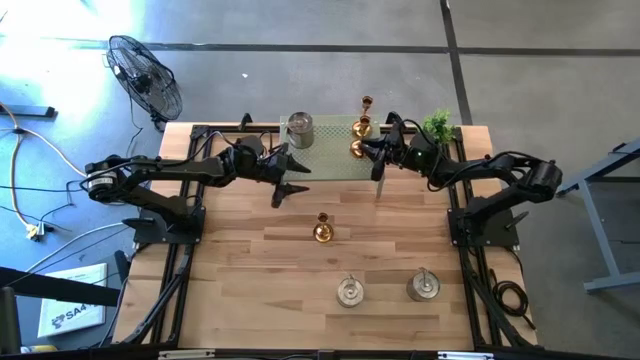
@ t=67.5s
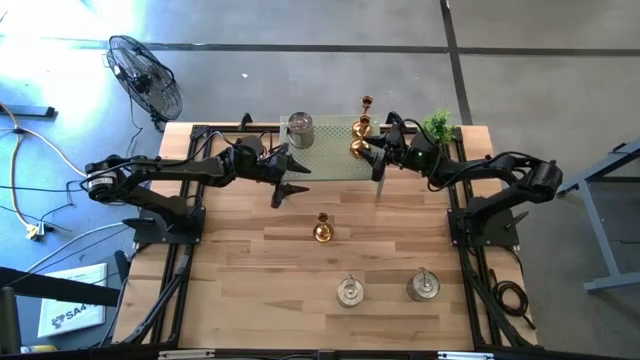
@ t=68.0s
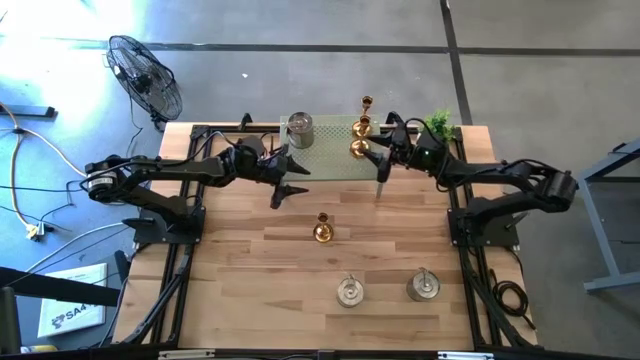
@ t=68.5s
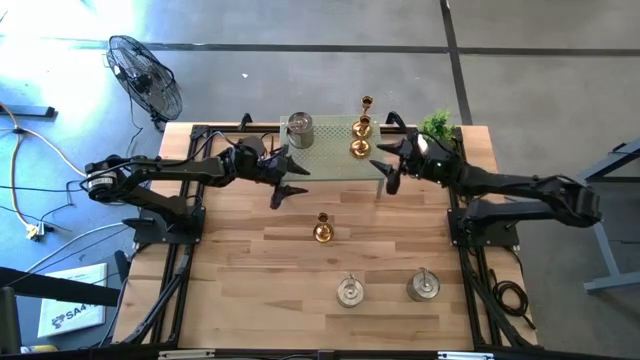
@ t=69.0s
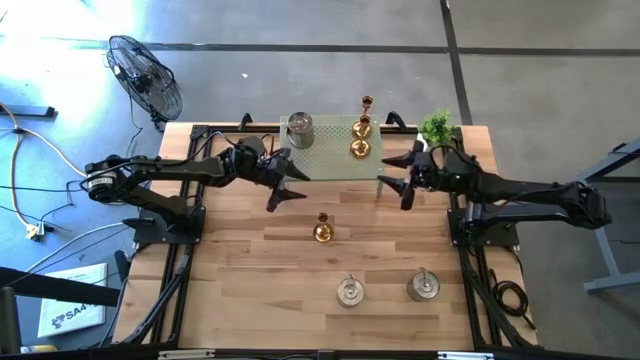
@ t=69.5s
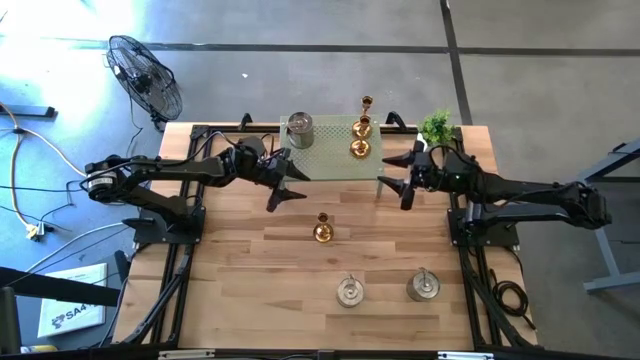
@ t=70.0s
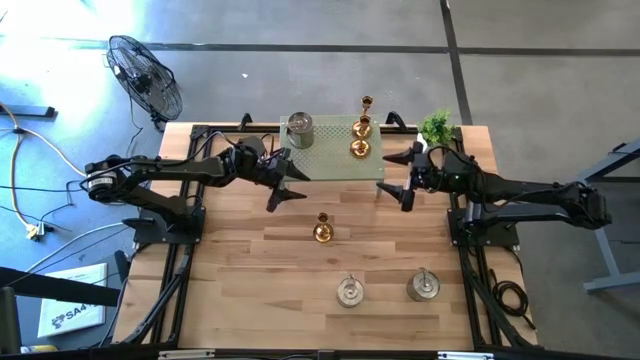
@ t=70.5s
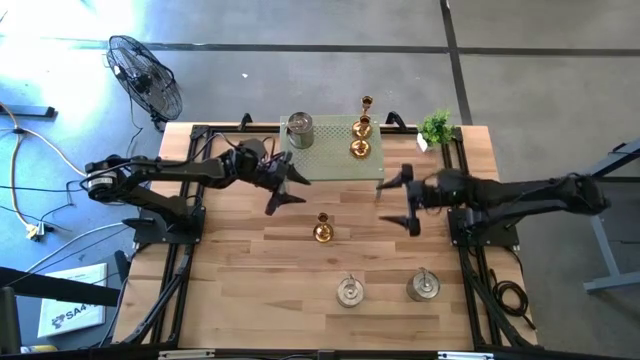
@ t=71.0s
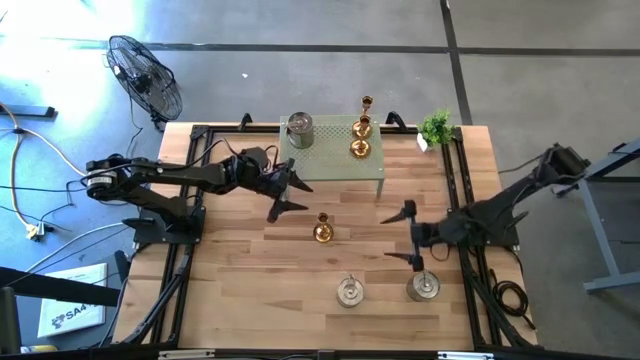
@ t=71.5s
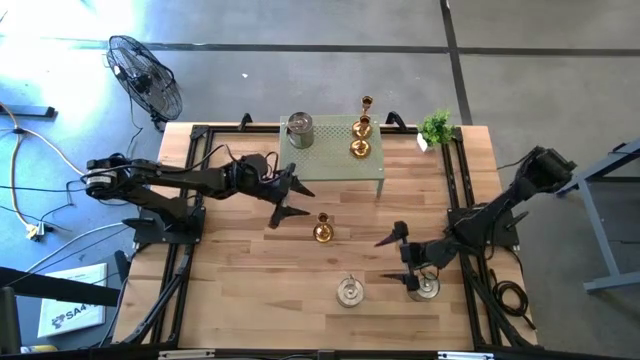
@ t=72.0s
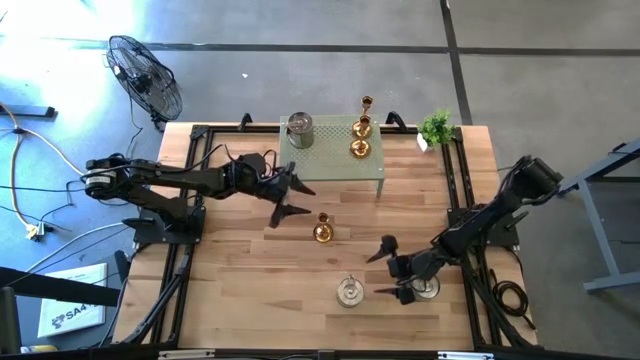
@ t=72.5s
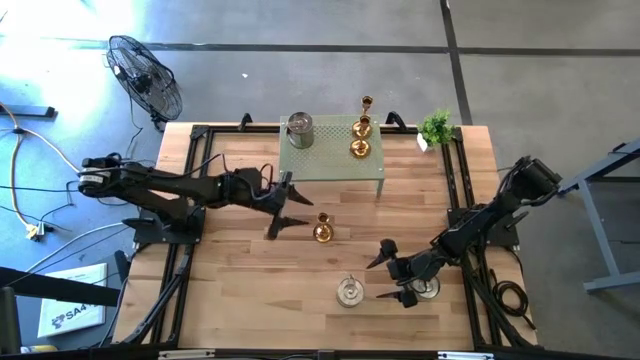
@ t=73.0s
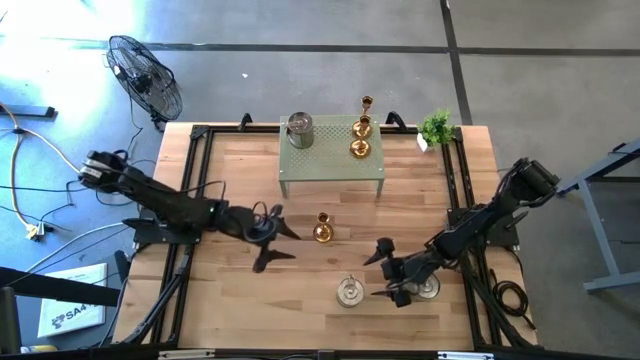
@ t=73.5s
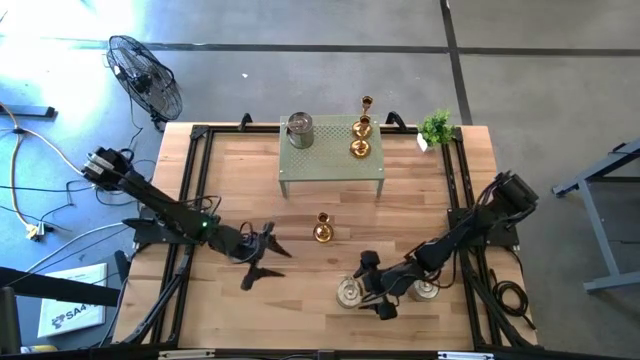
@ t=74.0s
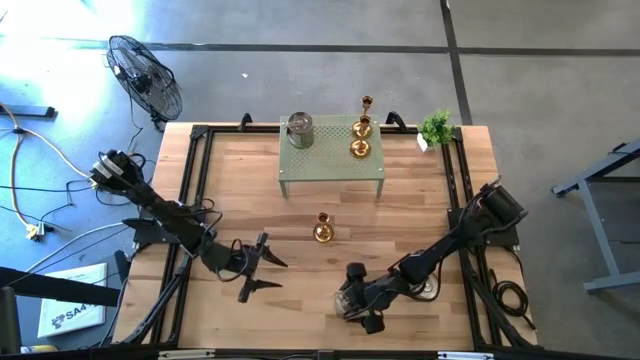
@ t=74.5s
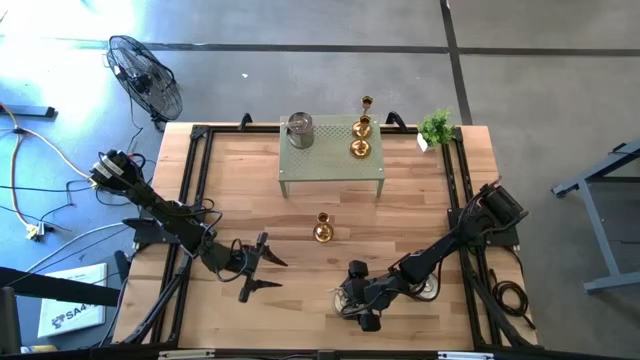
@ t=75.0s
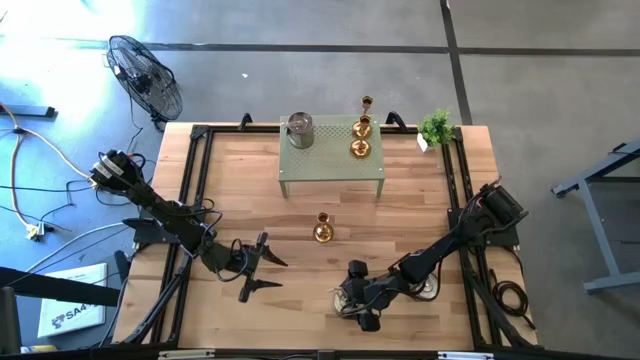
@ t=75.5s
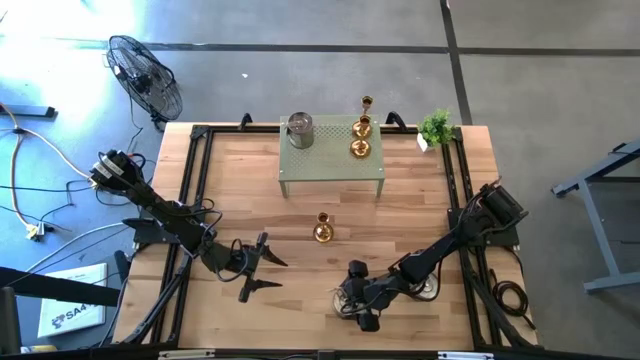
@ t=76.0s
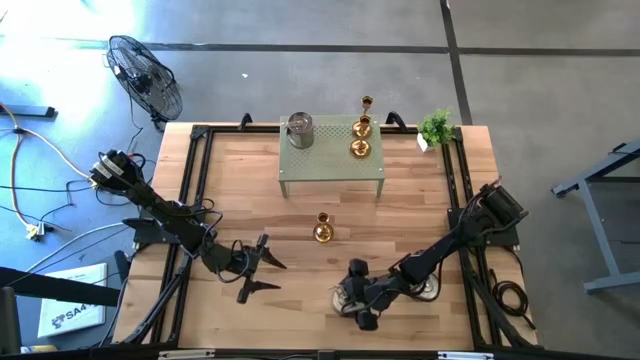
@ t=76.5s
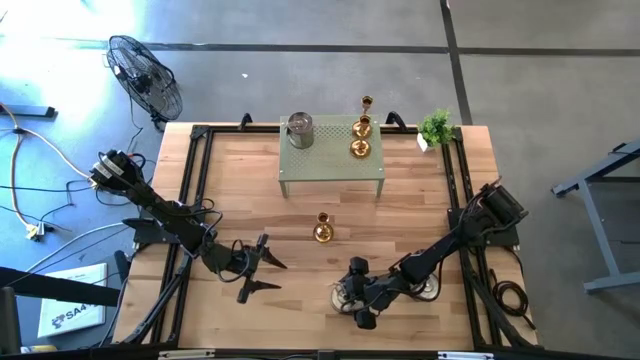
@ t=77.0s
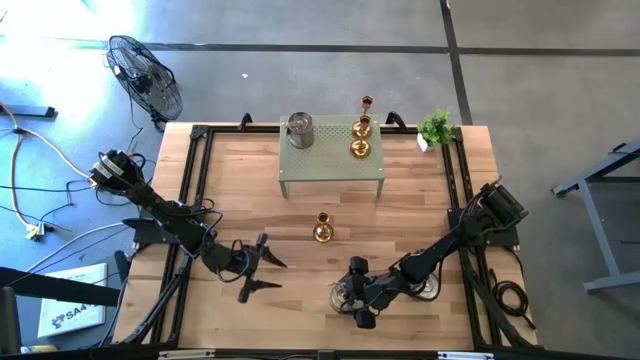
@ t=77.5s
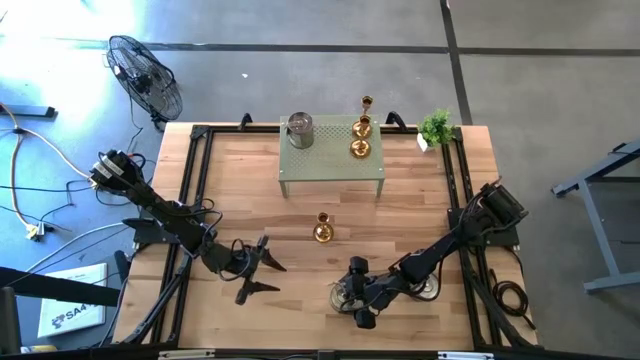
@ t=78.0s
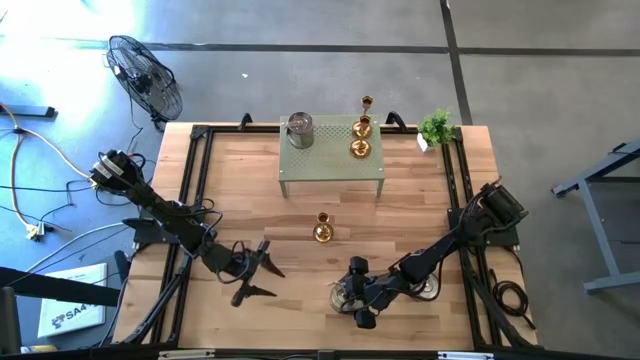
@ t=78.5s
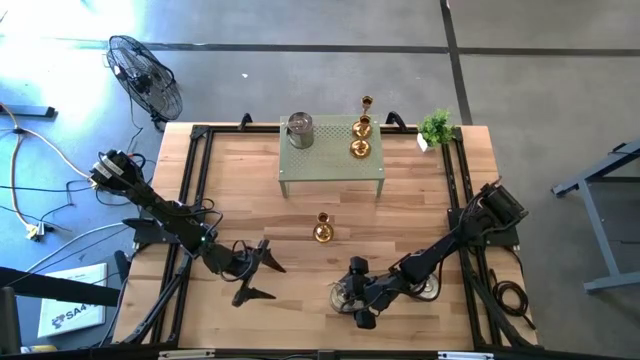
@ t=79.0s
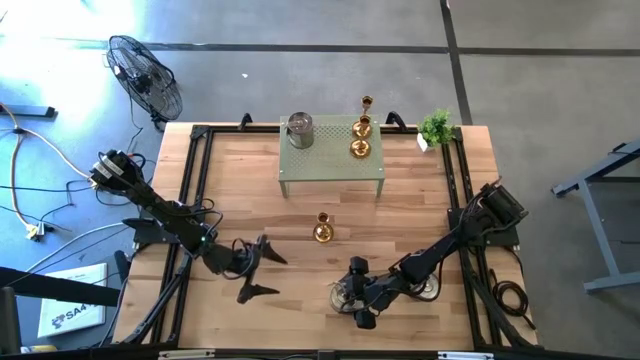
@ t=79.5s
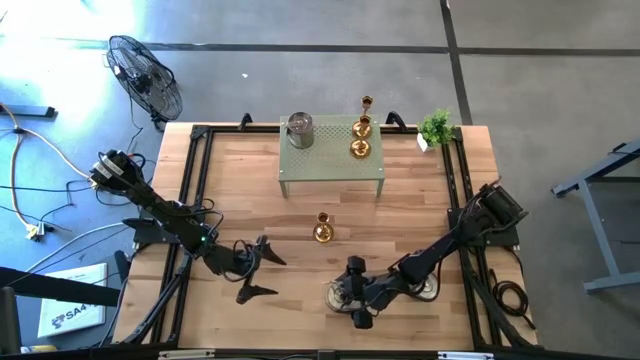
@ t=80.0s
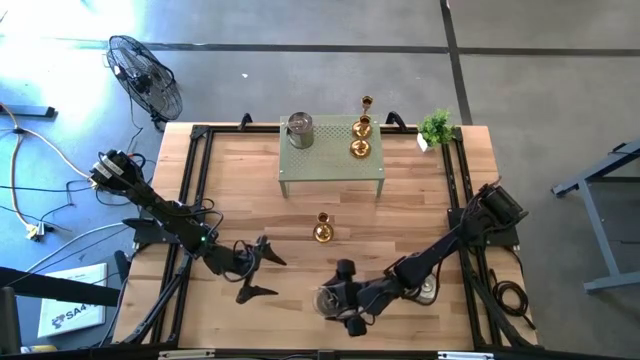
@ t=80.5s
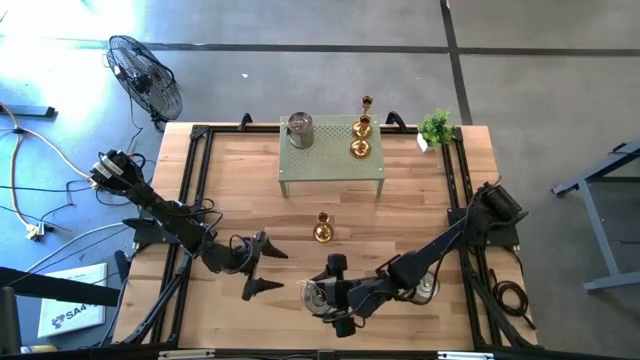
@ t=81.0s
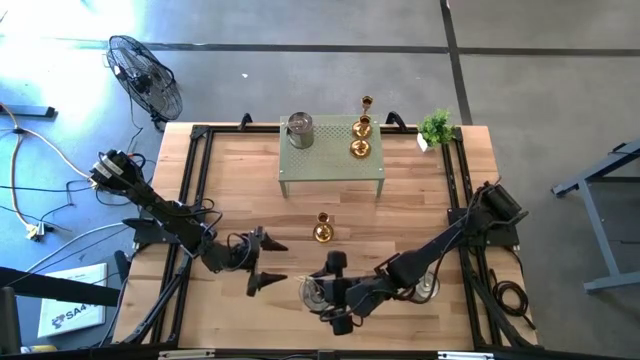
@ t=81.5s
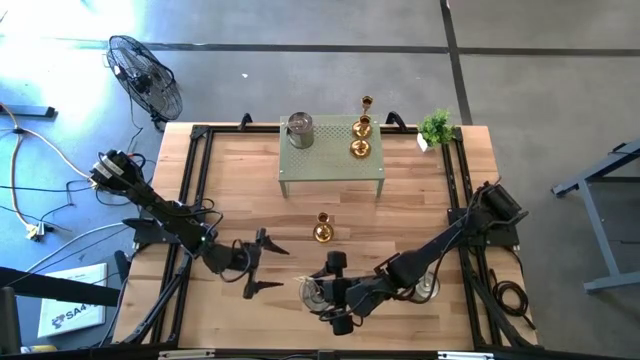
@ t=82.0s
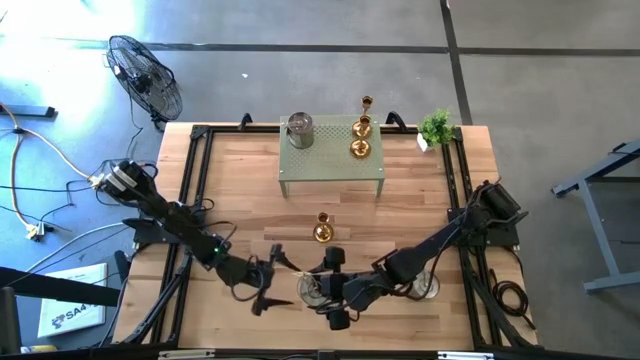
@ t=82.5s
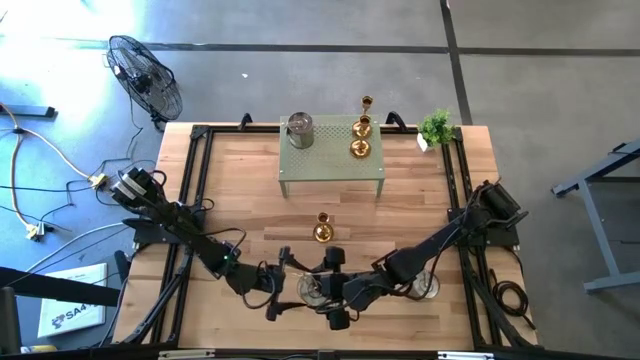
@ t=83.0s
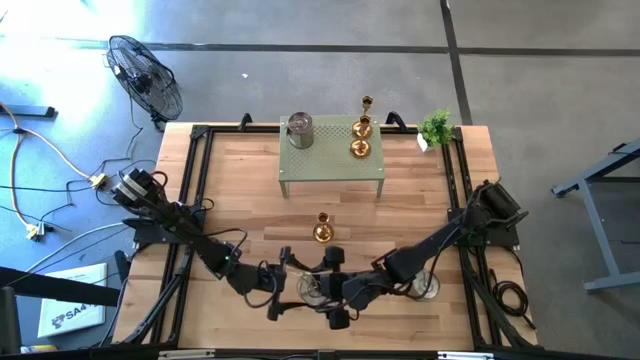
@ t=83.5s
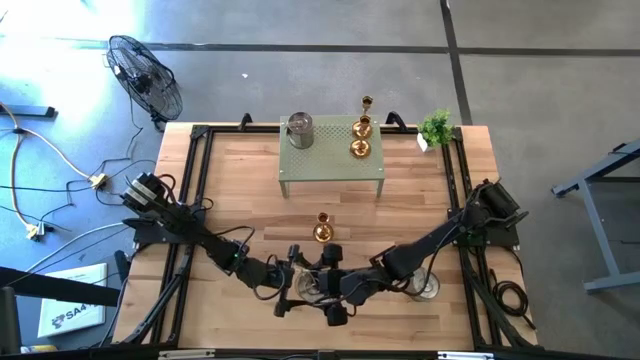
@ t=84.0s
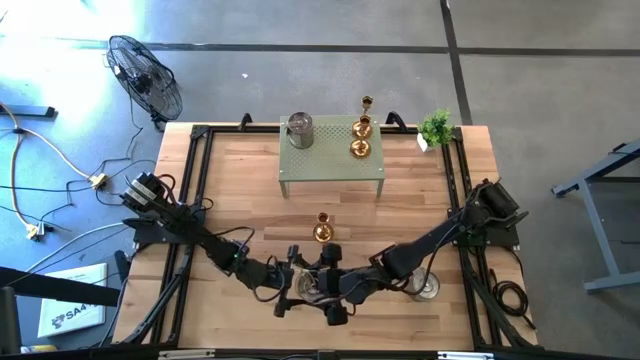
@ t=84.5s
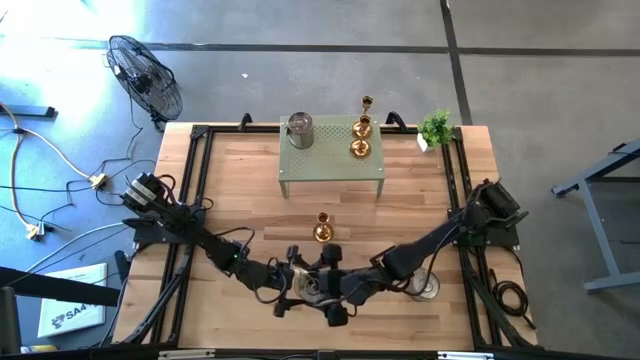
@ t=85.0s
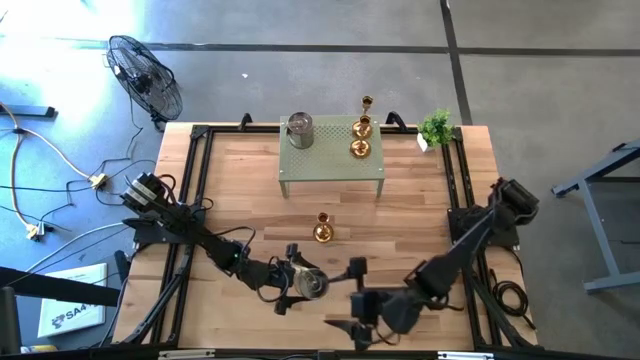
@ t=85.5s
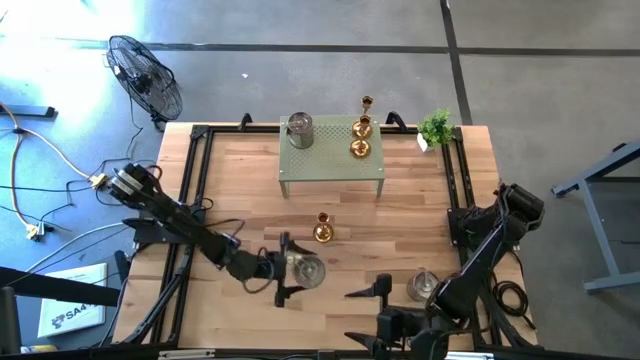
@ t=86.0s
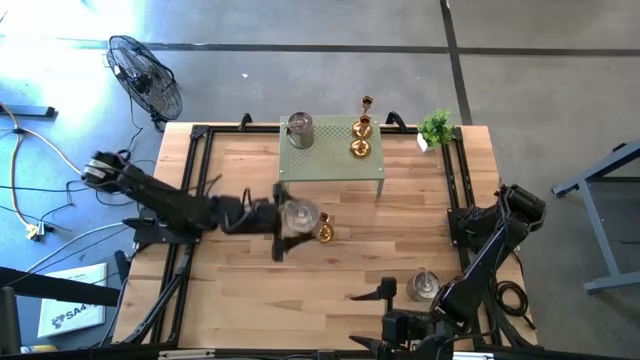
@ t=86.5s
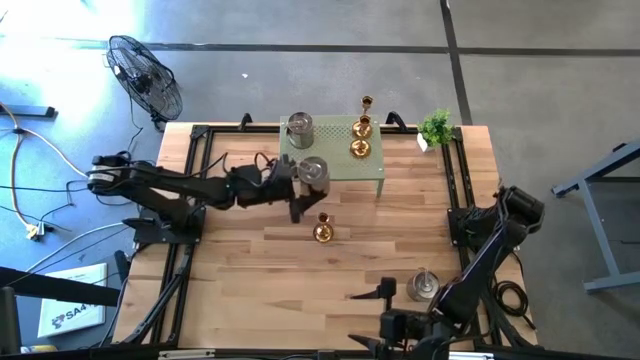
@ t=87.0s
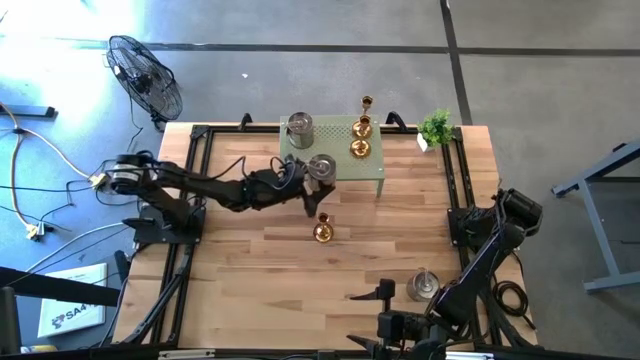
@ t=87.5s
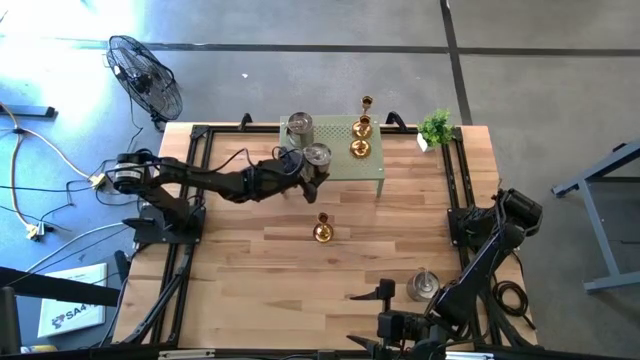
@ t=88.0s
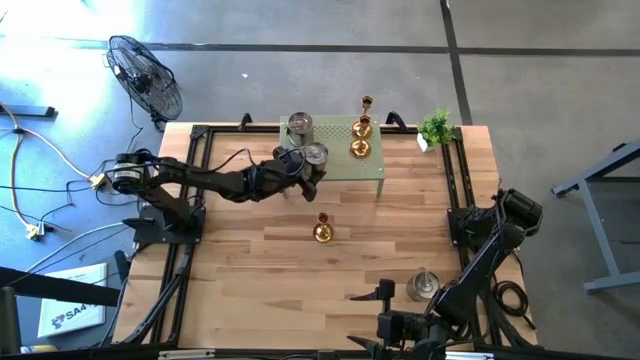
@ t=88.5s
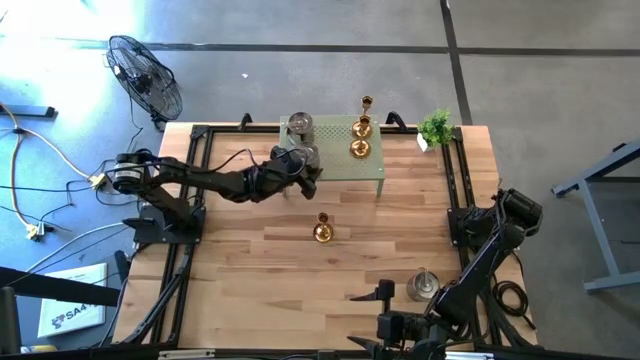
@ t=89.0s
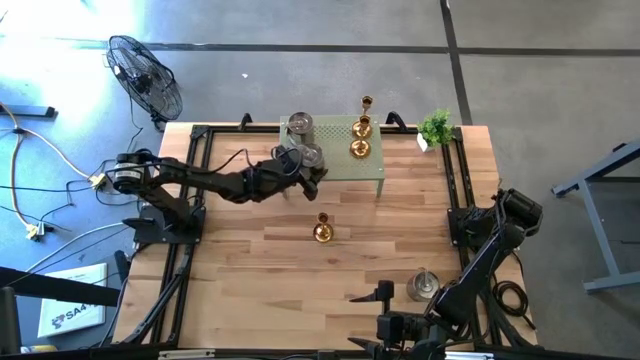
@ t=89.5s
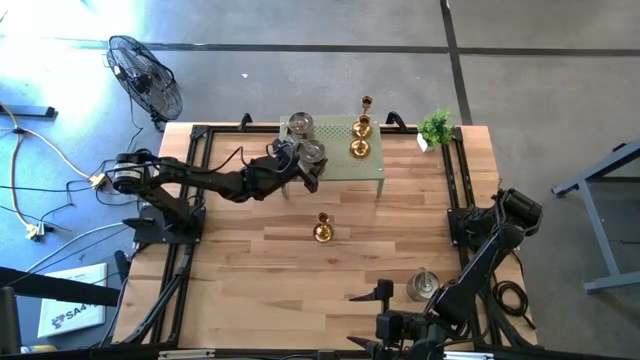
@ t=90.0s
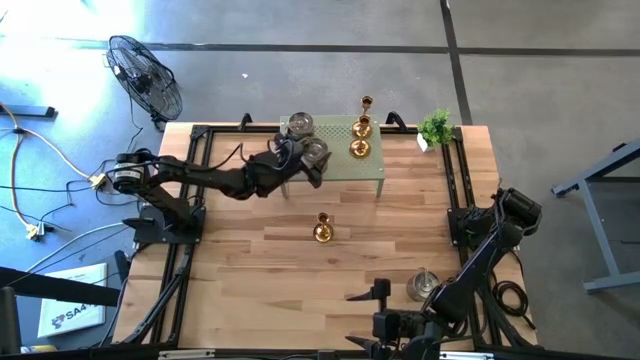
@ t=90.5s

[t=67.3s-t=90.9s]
Task: Pick & Place candle stick holders
Put the left silver scented candle on the shelf
